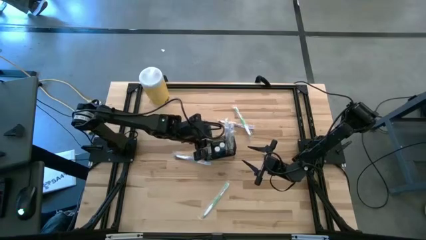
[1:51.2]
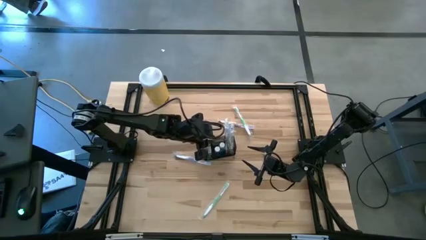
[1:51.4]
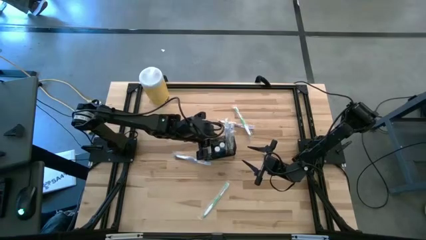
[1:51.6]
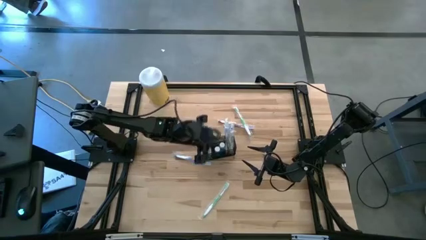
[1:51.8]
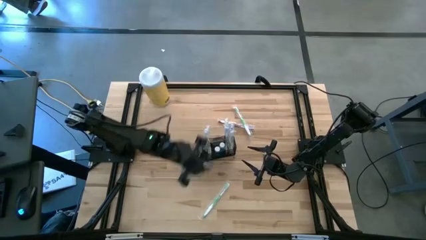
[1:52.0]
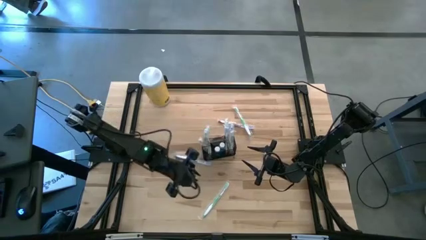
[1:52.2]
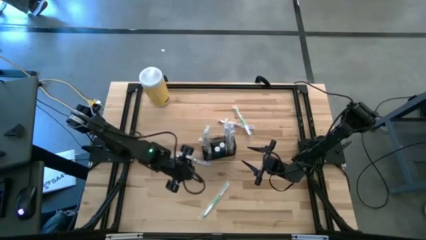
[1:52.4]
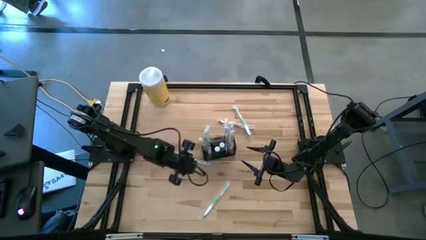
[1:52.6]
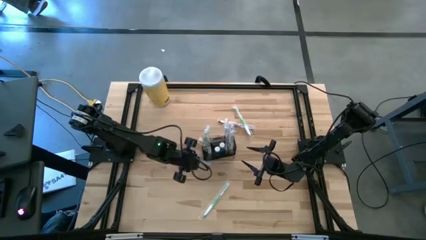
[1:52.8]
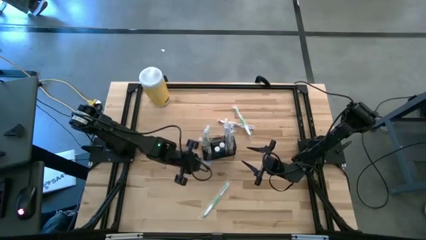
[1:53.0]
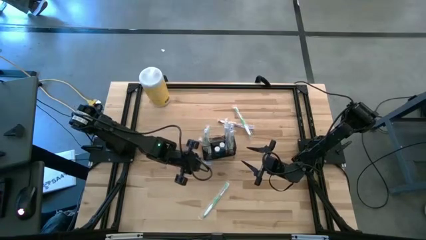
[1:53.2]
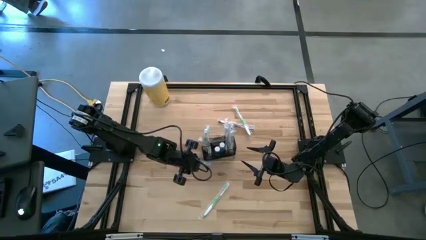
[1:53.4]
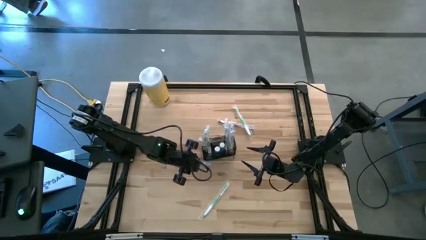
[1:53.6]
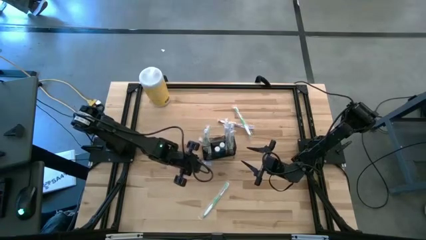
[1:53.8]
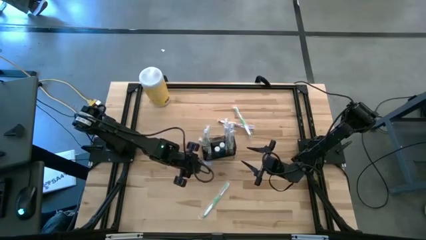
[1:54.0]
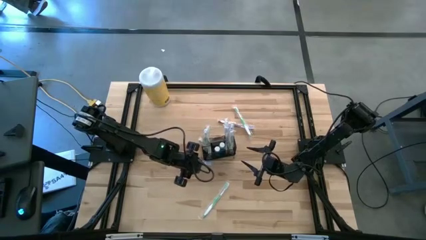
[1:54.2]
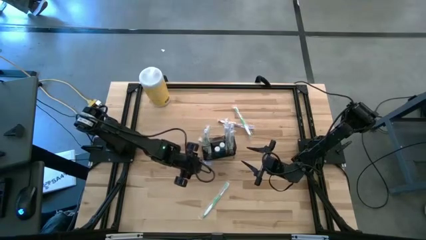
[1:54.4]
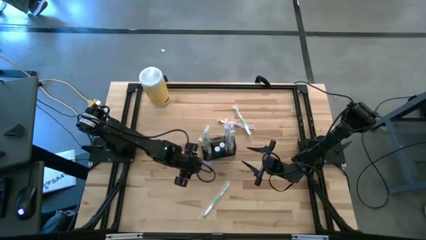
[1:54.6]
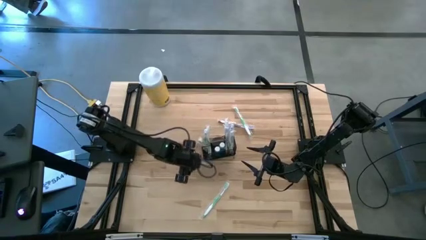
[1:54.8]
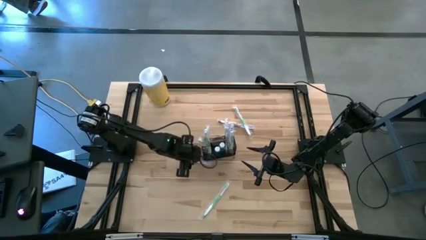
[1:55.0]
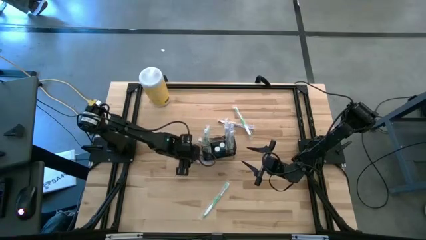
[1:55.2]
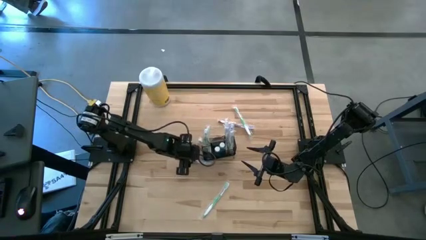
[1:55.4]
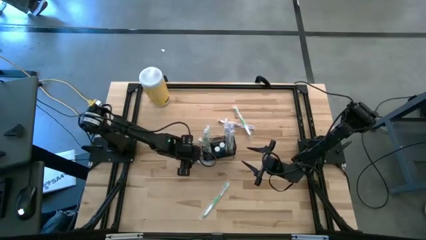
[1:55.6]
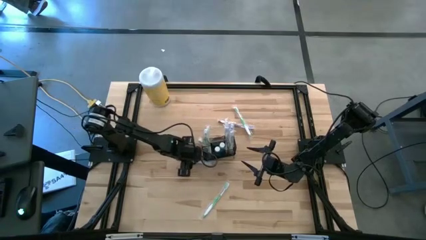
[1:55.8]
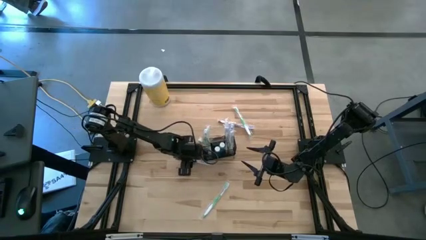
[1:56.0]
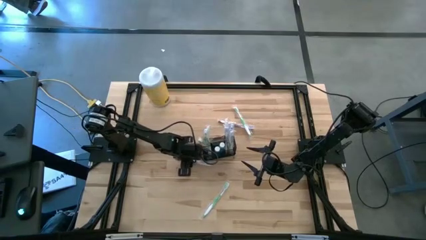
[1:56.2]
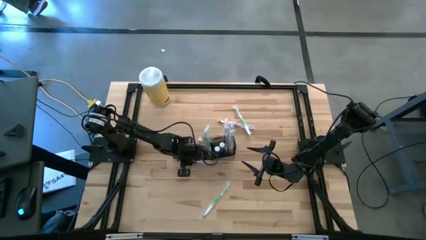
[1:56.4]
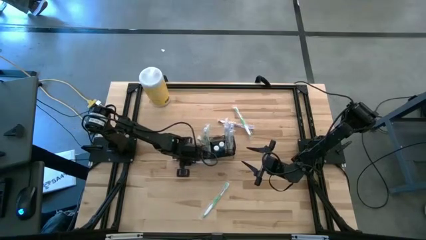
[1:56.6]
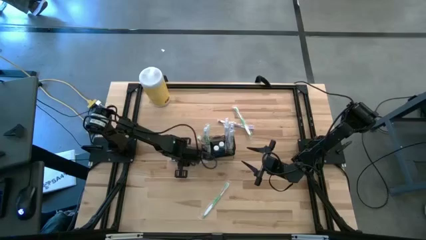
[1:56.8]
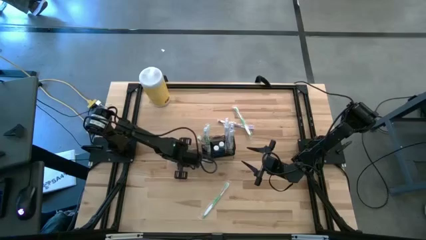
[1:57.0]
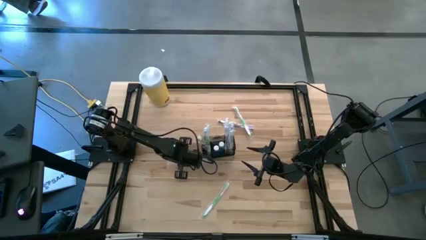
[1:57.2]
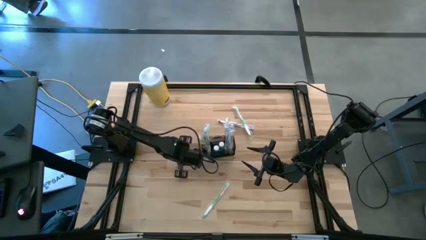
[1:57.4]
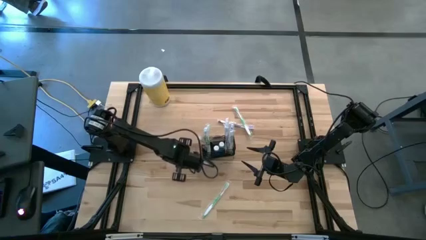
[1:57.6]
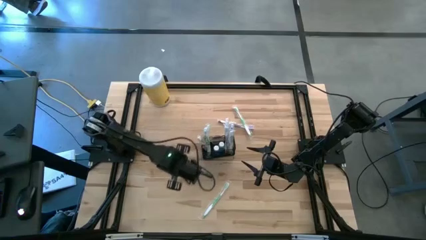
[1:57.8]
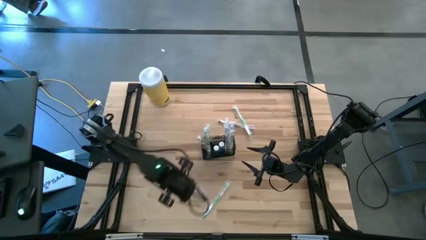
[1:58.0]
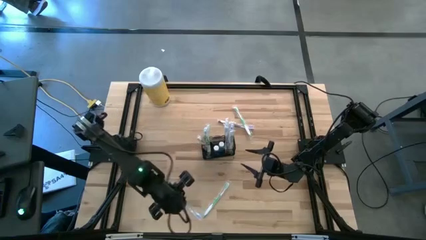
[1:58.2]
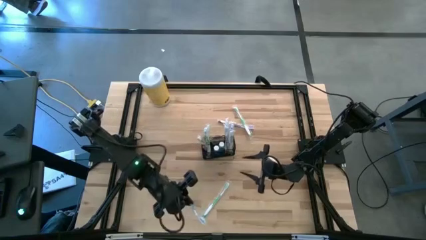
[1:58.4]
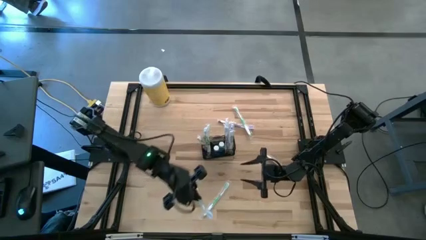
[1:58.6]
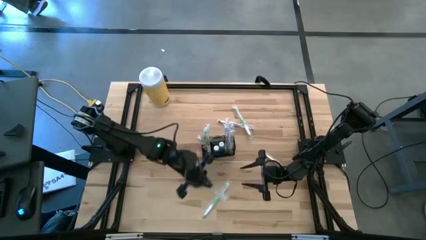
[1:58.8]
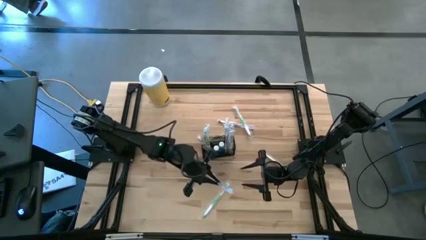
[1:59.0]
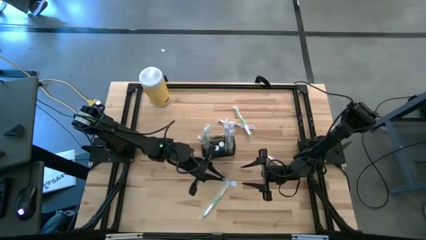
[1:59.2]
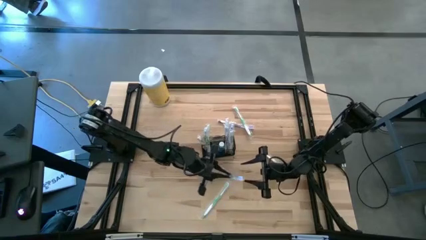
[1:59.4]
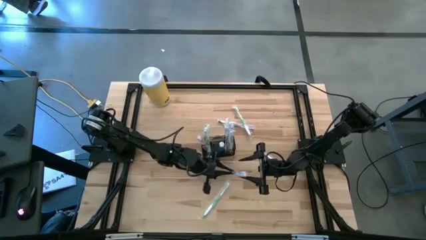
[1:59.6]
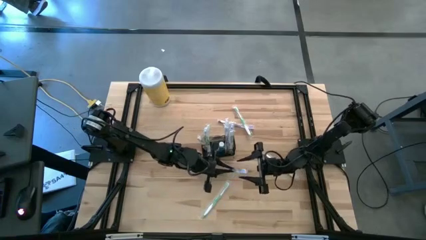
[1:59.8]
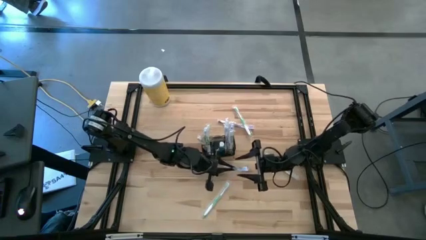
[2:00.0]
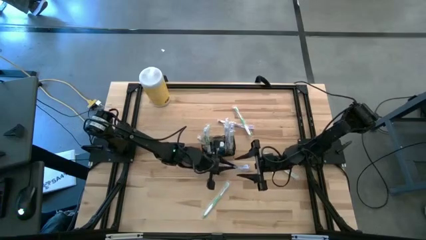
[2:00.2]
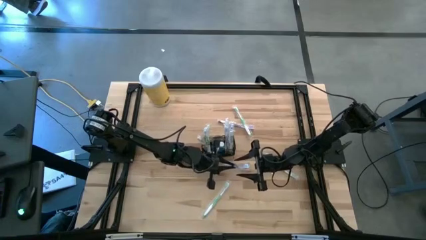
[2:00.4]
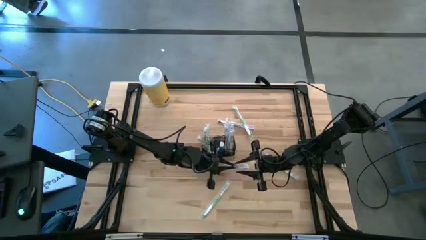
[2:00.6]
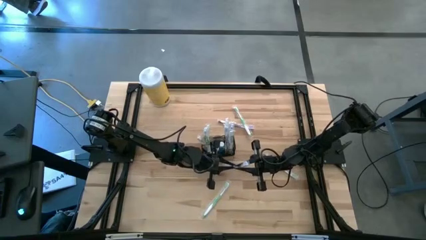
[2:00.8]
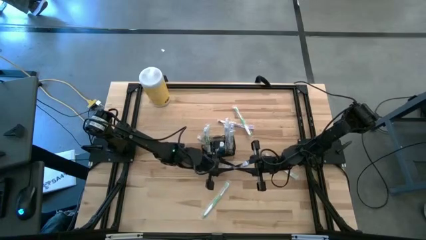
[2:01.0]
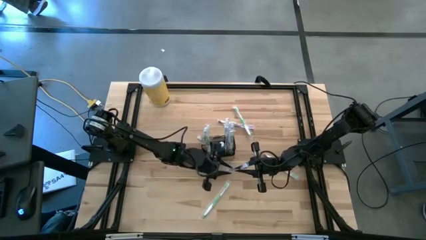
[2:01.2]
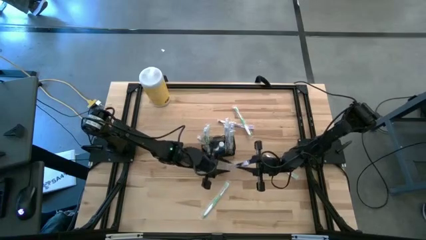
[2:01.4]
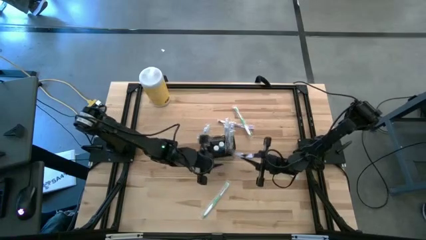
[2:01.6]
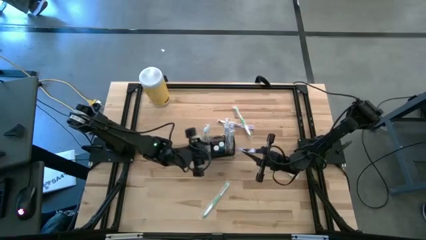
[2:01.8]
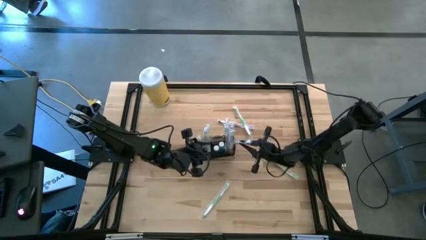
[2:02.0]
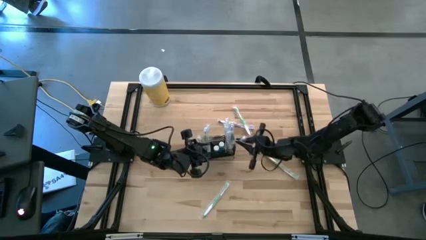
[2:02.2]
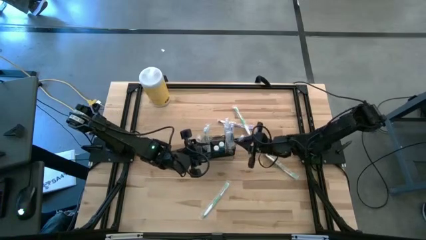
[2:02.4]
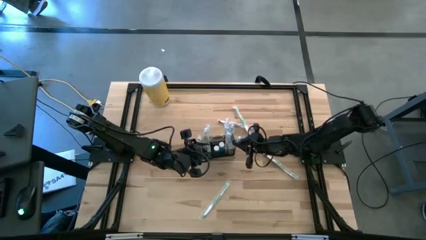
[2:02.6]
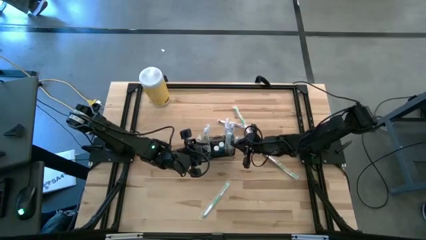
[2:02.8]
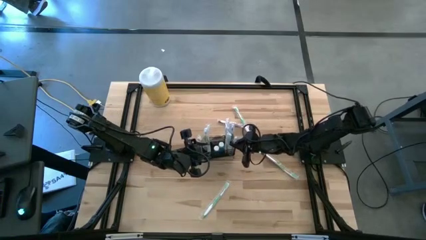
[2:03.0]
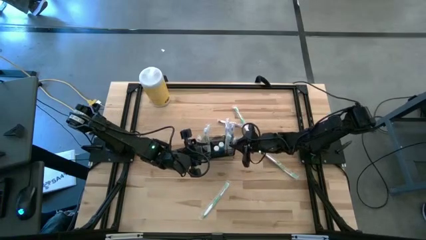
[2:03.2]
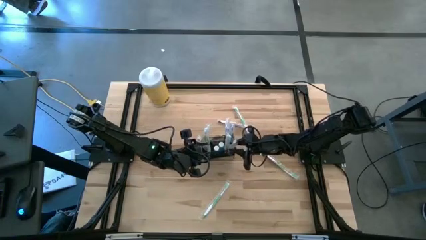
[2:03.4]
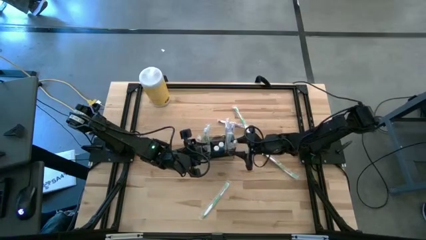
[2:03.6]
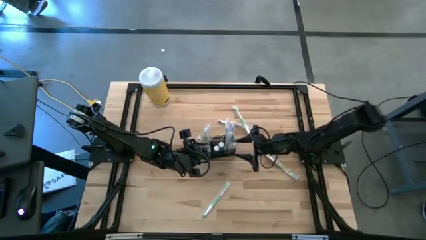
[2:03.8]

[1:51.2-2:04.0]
Task: Pick & Place toothbrushing station
Put the blue toothbrush into the wire organizer

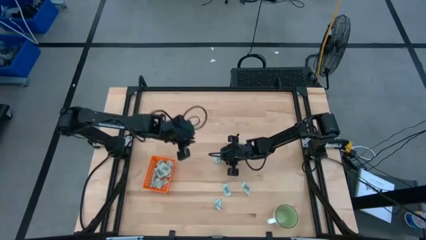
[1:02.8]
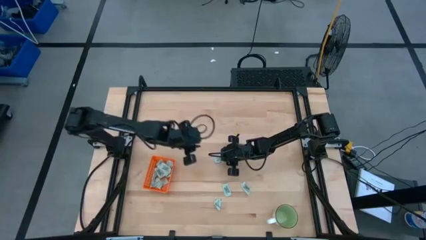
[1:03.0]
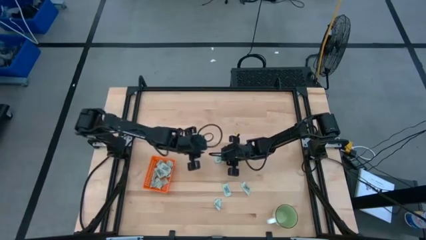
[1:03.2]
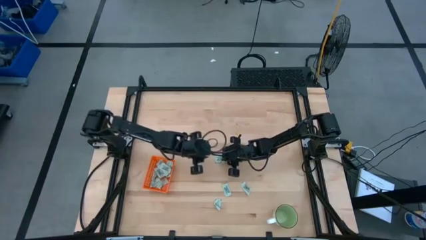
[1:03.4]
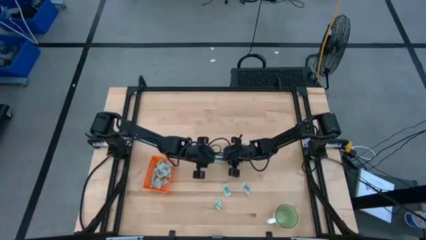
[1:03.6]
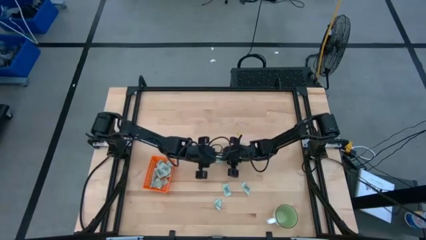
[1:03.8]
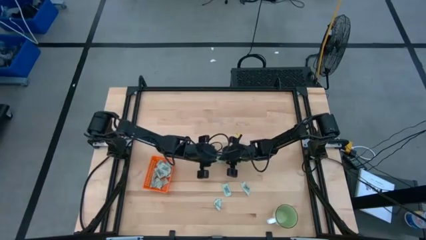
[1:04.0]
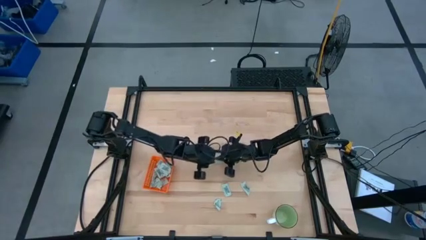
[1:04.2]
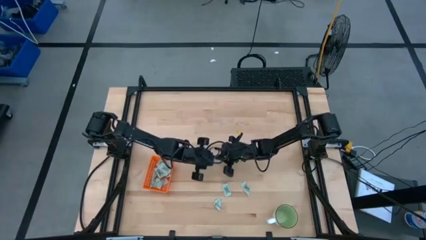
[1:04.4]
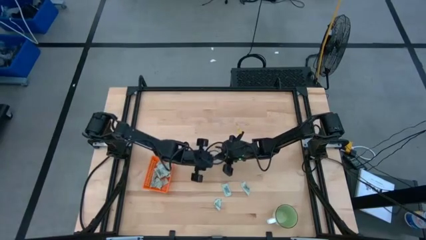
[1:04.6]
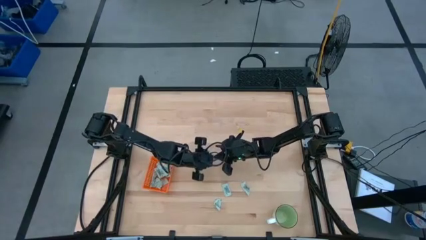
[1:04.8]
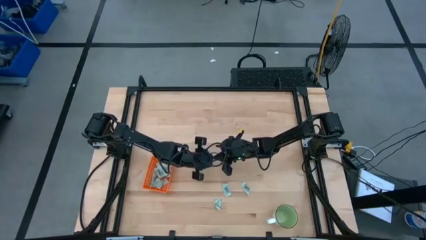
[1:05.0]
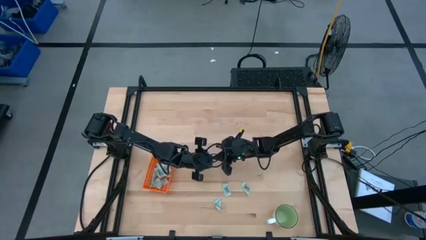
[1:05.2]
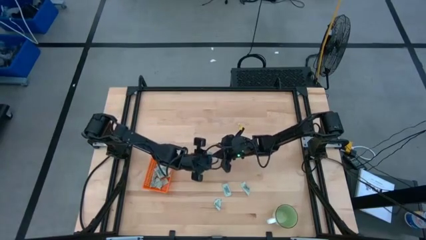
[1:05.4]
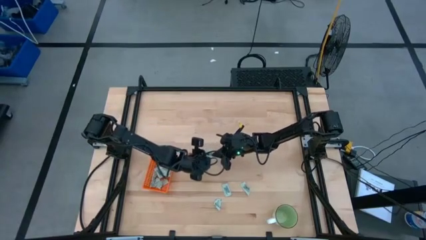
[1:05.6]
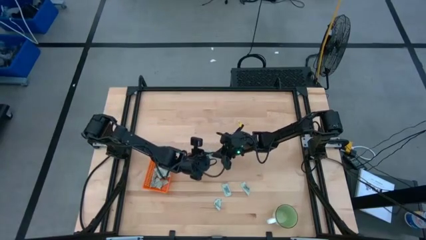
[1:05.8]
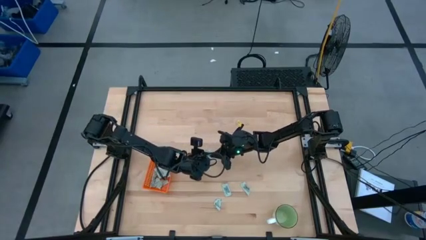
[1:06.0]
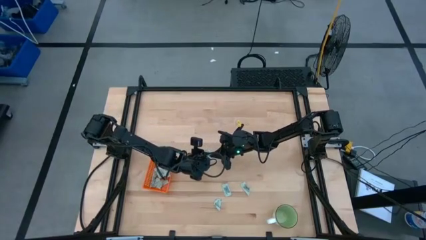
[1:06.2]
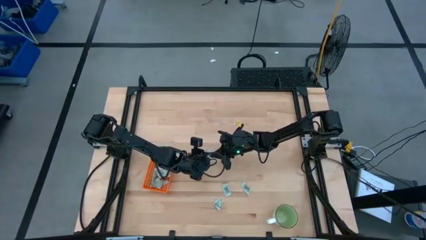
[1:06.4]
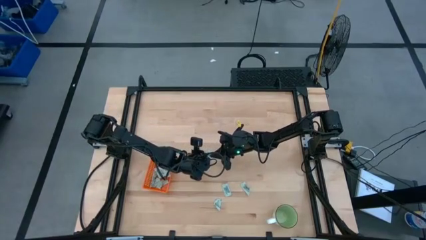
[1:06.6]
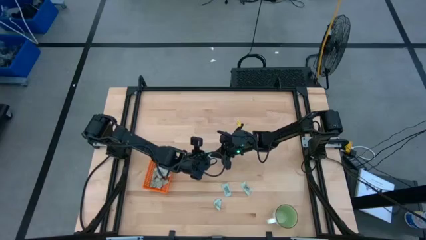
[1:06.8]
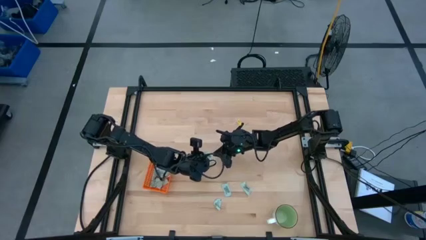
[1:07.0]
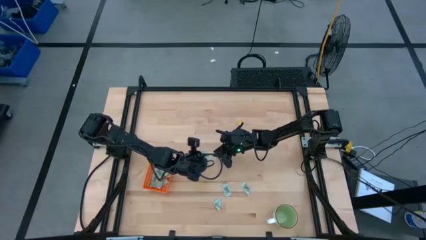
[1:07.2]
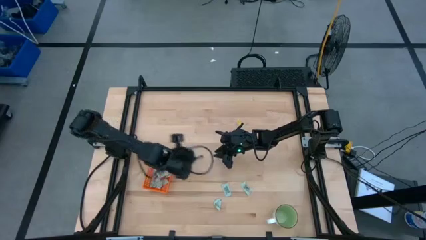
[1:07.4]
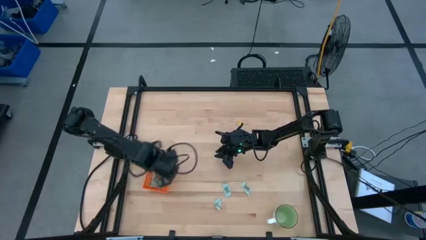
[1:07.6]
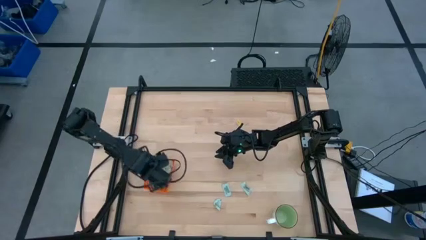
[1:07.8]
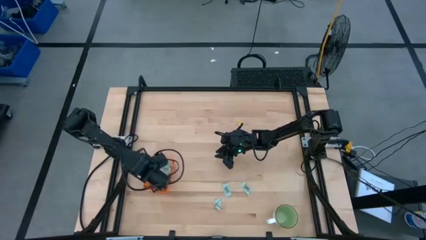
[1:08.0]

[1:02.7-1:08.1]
Task: Pick and place Stevia / Truvia into bins
Put the white stevia packet into the orange bin
